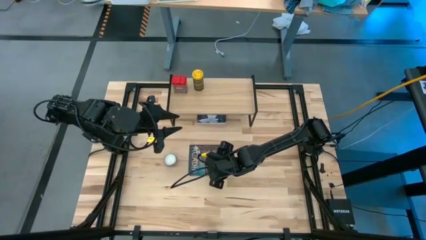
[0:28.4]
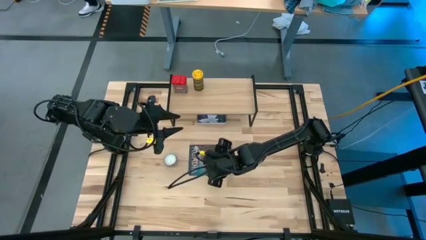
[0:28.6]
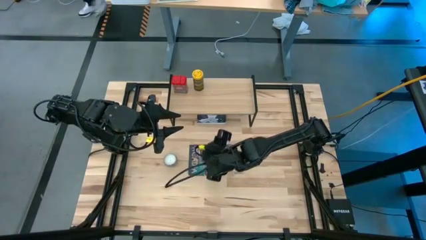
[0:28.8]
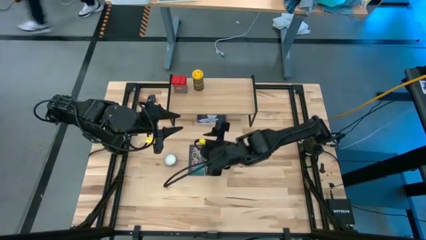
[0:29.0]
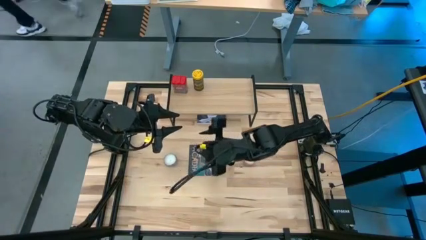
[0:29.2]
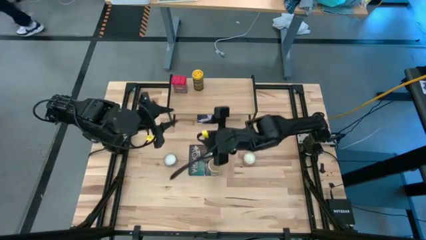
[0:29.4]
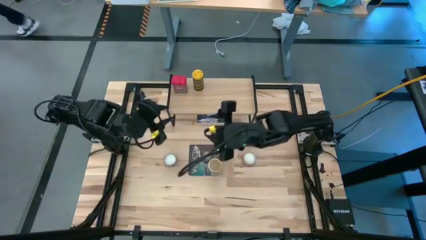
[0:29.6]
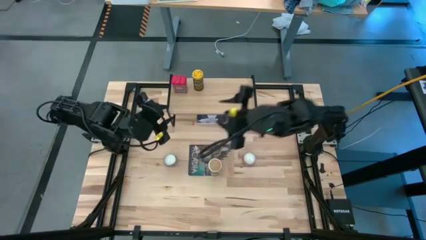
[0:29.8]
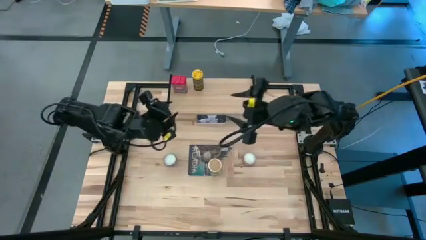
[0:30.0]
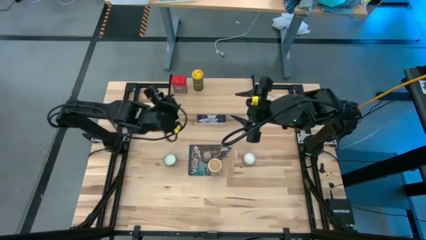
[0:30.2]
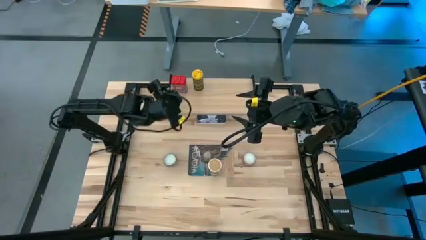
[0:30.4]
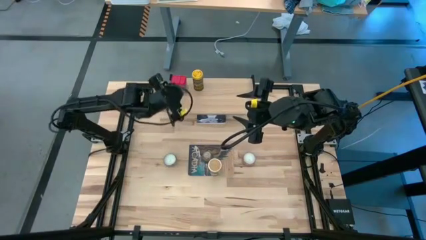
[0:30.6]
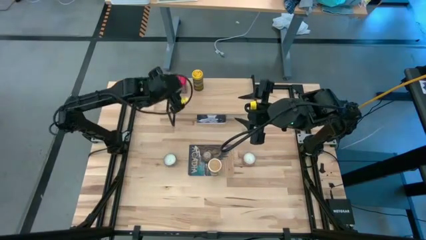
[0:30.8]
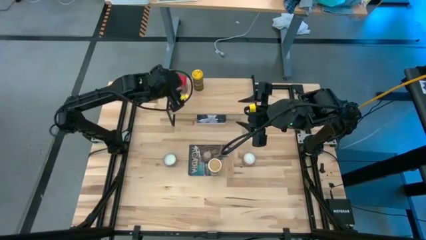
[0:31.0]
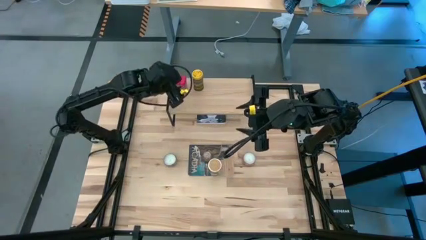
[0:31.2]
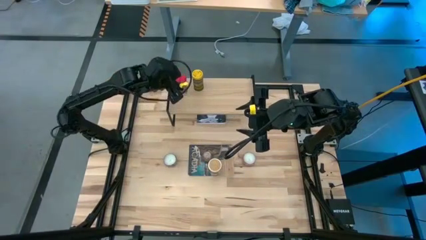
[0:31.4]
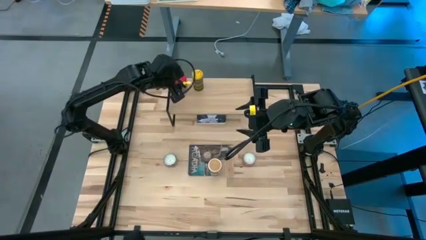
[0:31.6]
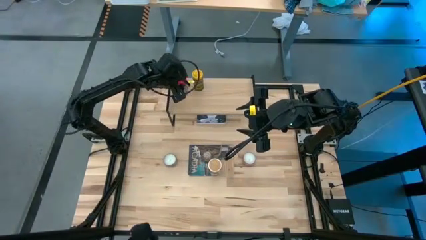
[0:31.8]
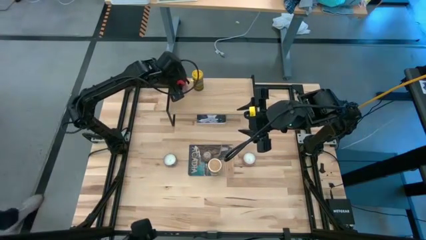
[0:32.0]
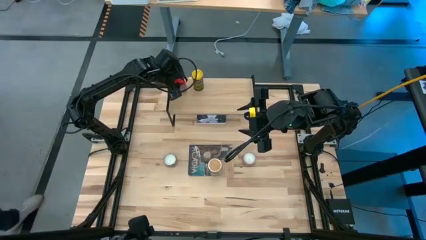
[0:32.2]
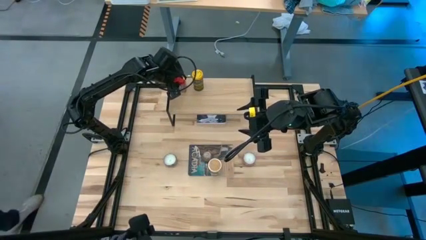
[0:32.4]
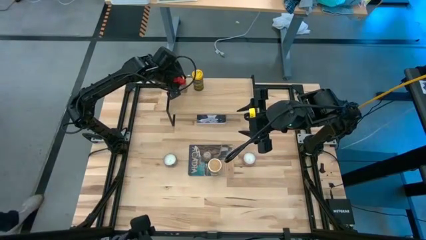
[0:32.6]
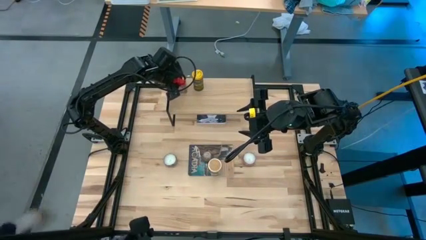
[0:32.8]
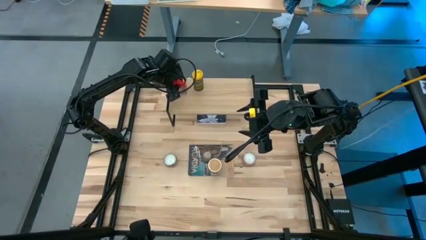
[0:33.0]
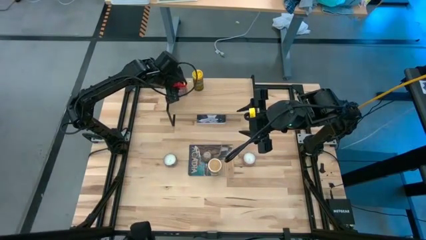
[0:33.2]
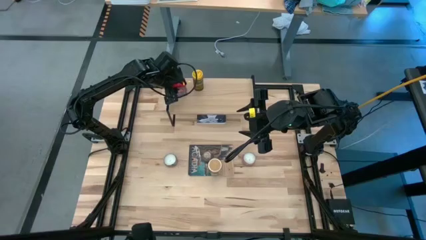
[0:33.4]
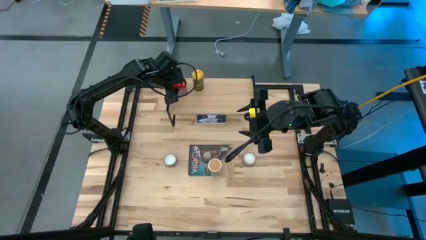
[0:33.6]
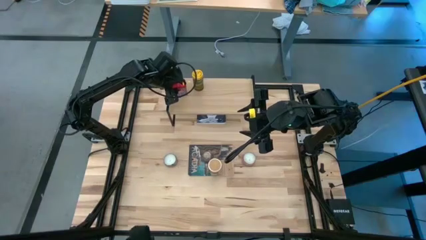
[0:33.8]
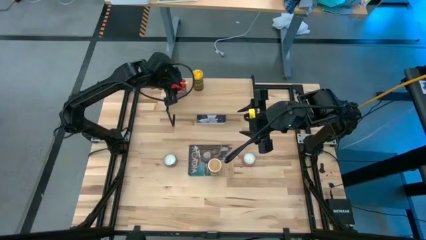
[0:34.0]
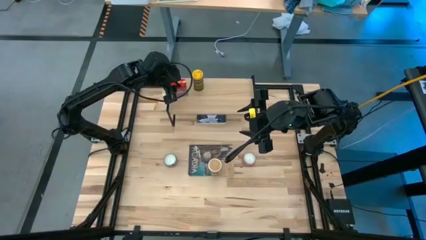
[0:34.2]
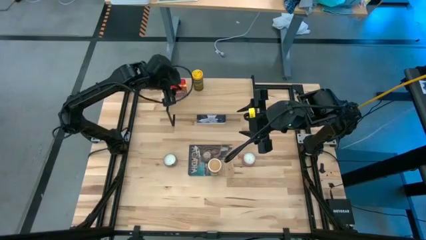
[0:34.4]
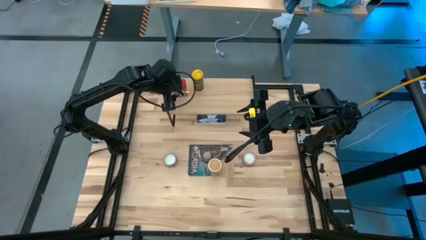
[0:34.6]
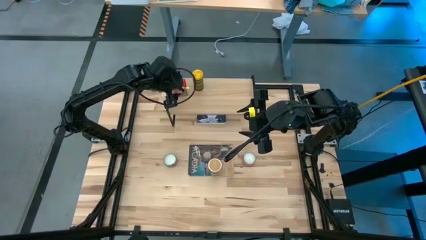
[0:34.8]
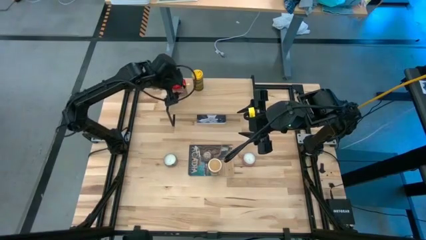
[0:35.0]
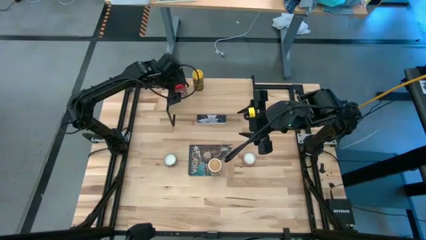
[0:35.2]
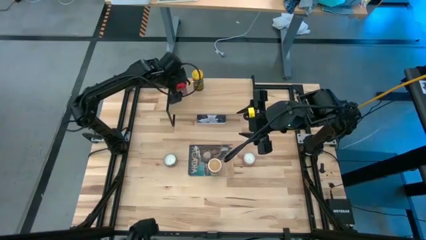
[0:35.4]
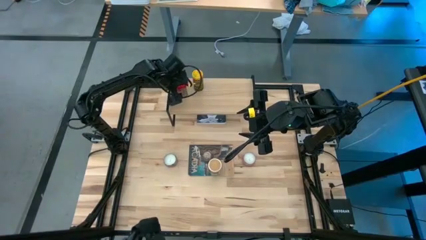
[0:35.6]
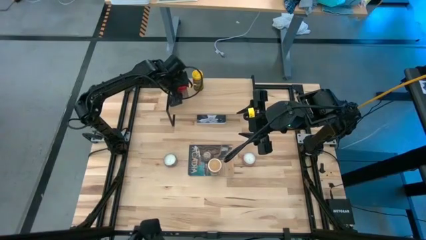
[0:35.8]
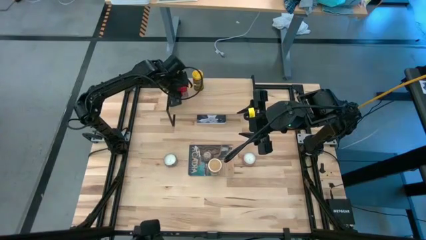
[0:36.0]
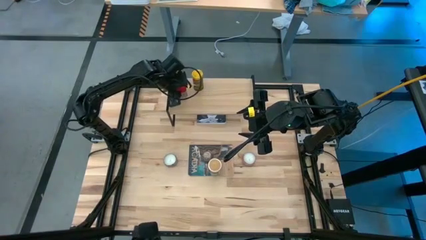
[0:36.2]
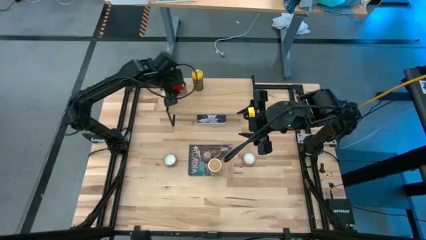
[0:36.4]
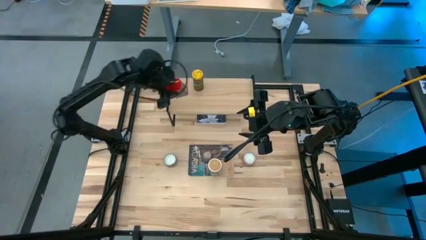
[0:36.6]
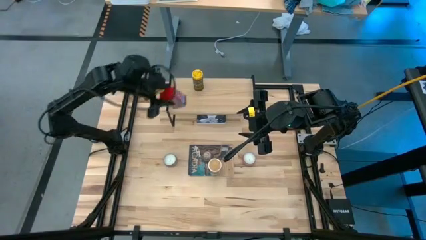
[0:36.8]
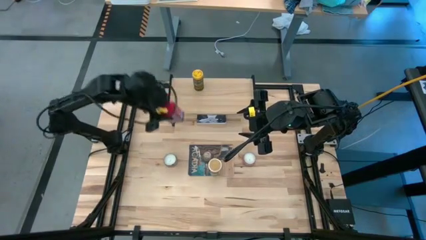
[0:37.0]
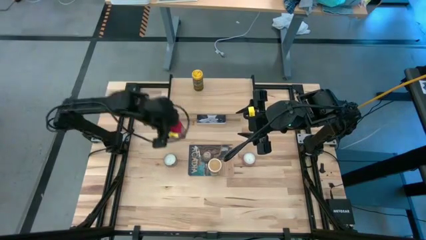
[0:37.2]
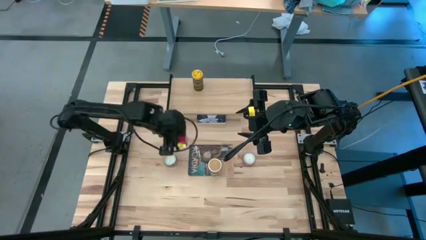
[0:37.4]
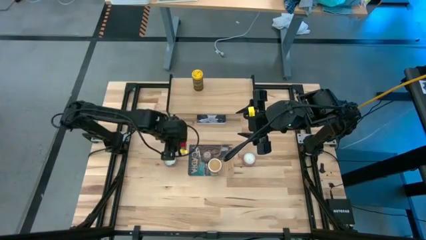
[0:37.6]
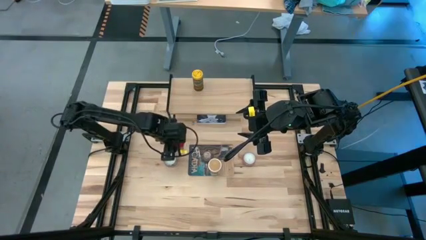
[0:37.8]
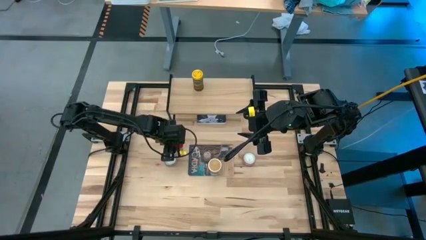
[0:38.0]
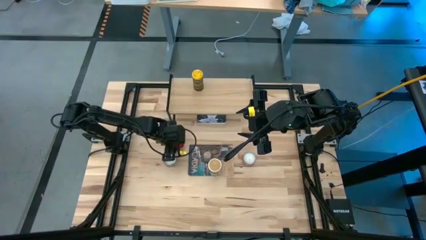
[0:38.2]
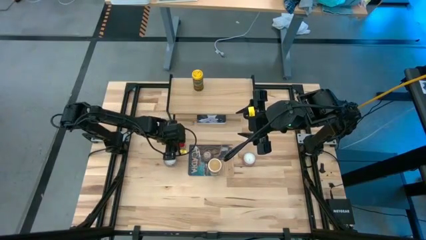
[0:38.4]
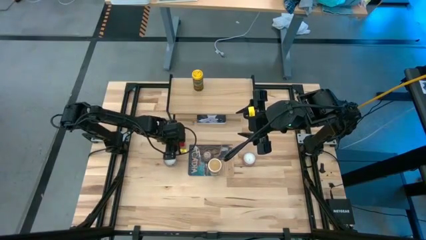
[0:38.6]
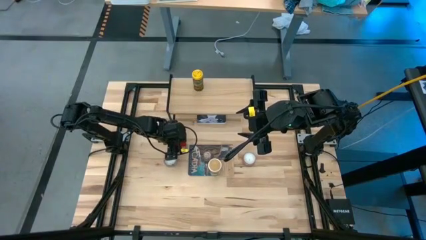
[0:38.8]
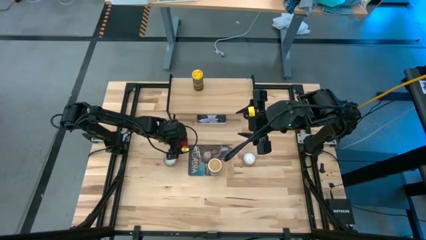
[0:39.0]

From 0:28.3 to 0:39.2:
Task: Shelf spices
Remove the red seasoning can from the shelf

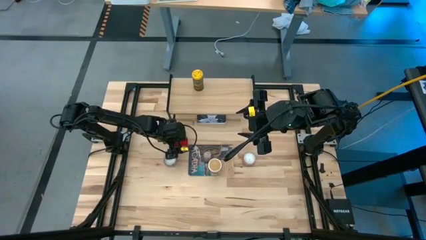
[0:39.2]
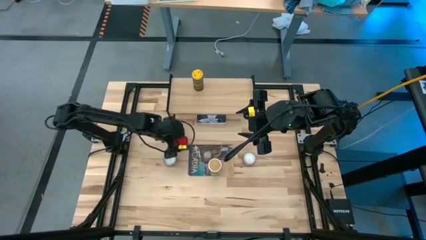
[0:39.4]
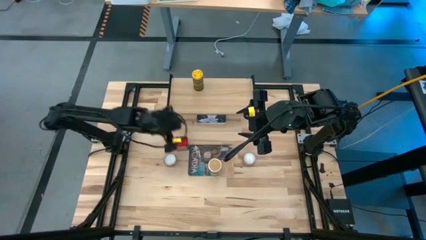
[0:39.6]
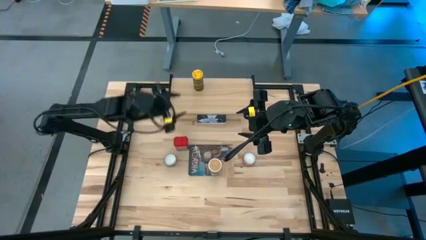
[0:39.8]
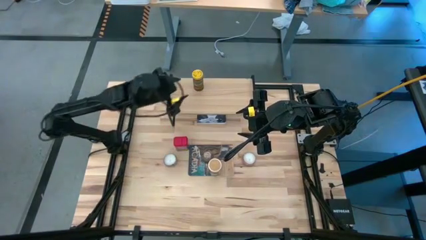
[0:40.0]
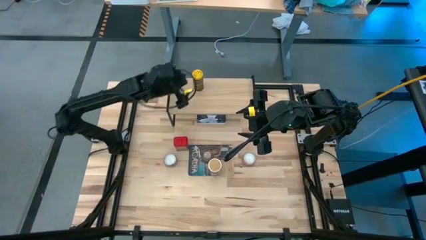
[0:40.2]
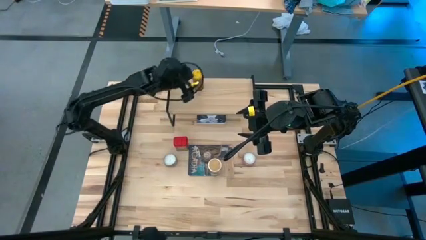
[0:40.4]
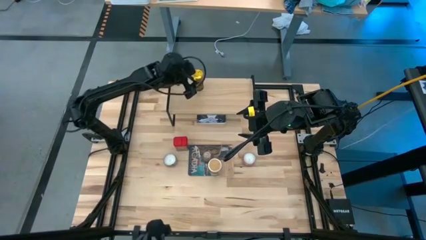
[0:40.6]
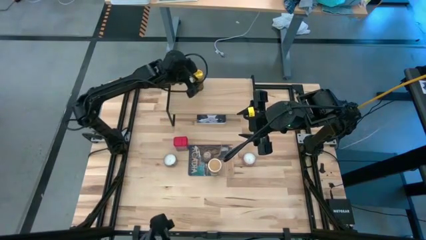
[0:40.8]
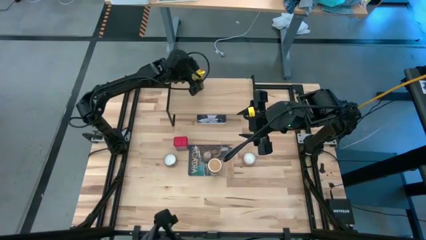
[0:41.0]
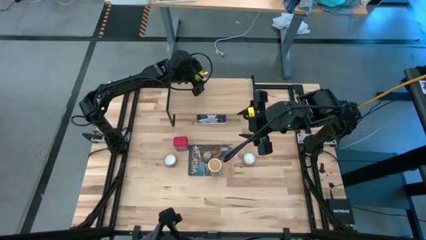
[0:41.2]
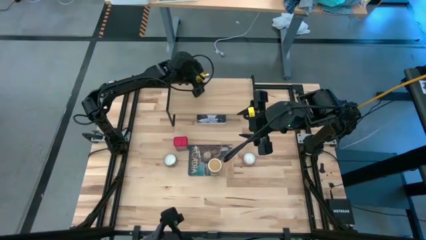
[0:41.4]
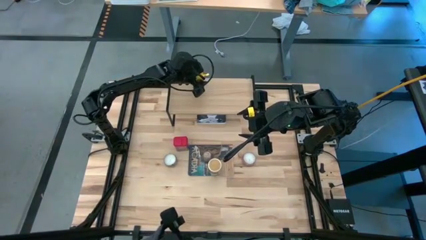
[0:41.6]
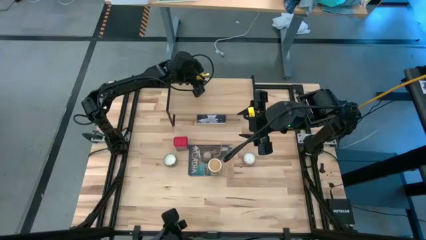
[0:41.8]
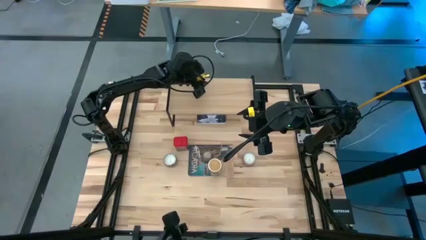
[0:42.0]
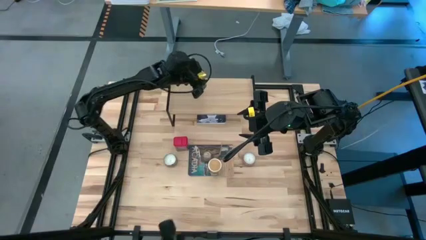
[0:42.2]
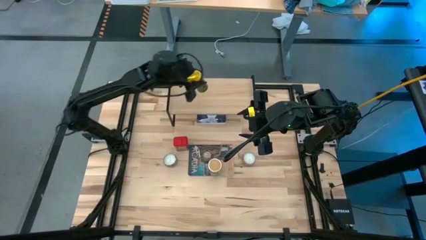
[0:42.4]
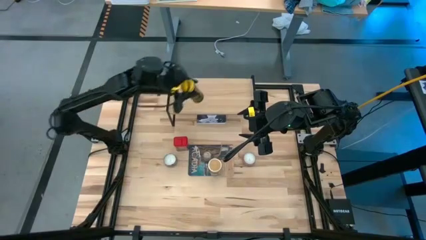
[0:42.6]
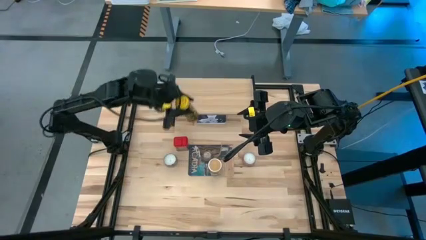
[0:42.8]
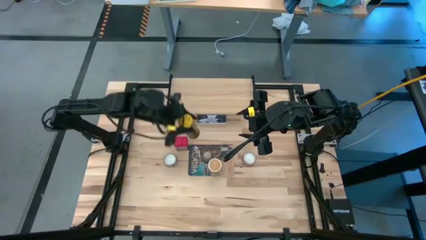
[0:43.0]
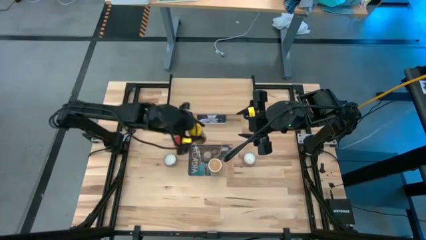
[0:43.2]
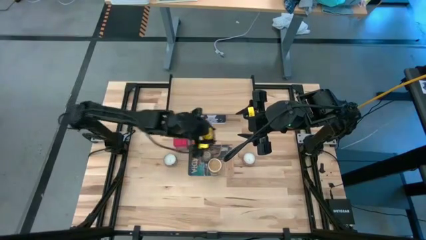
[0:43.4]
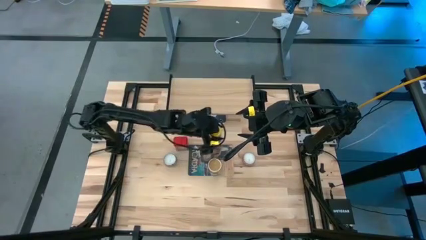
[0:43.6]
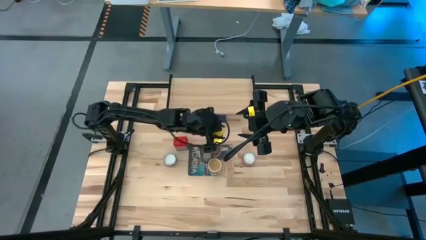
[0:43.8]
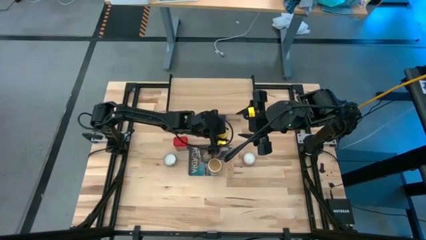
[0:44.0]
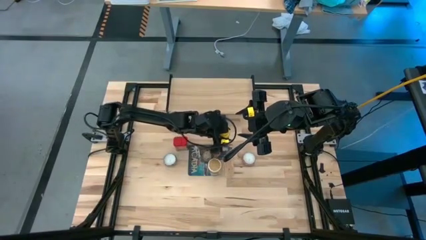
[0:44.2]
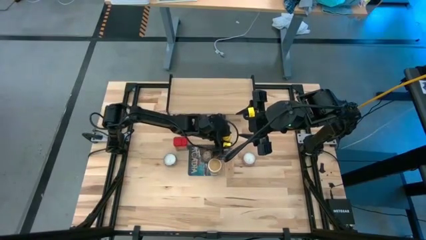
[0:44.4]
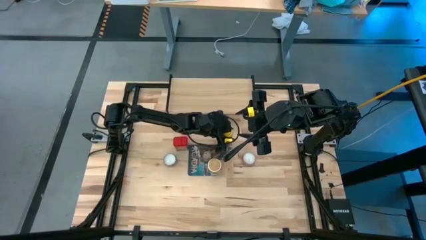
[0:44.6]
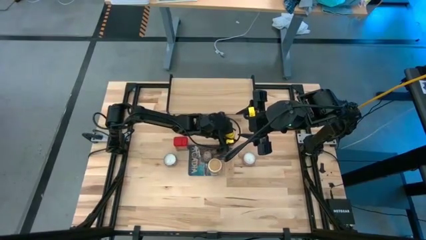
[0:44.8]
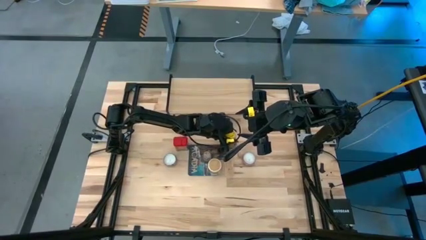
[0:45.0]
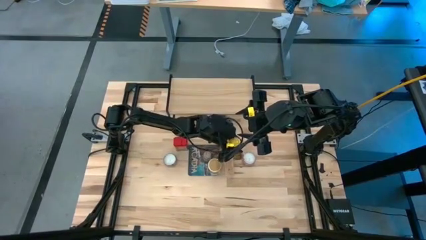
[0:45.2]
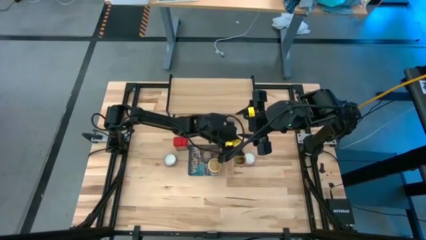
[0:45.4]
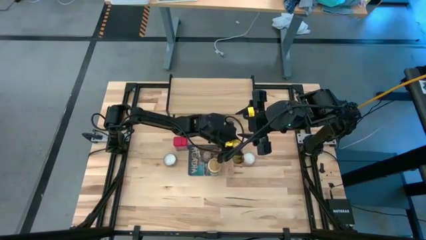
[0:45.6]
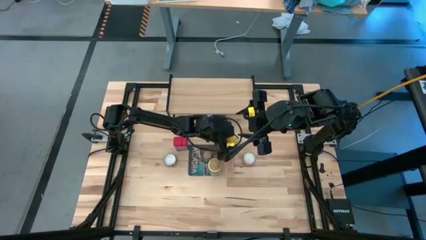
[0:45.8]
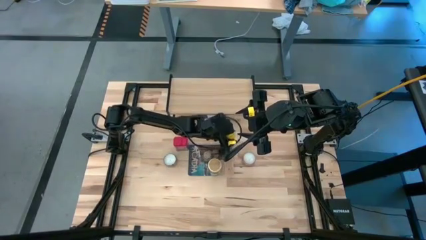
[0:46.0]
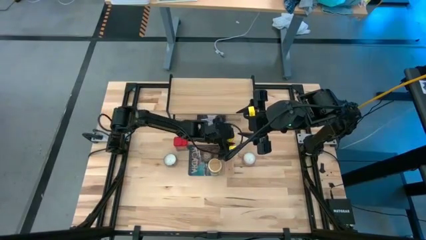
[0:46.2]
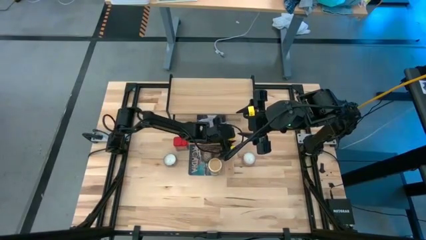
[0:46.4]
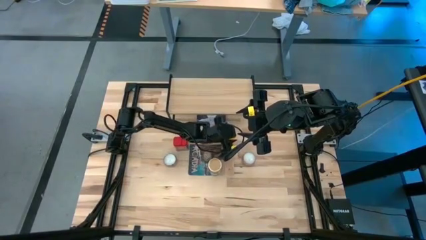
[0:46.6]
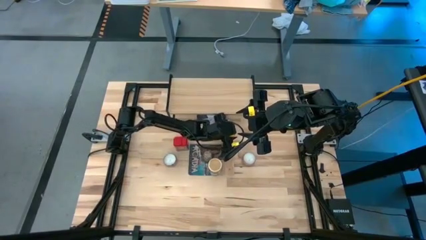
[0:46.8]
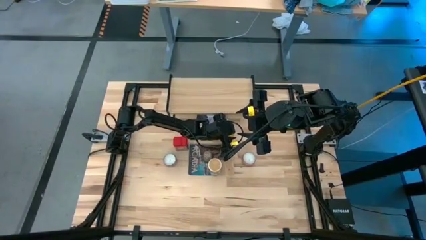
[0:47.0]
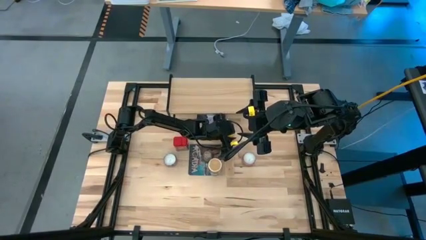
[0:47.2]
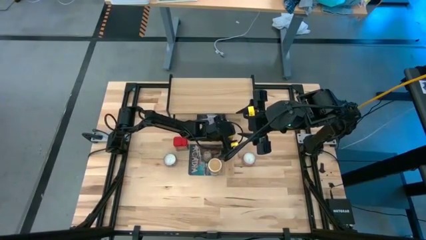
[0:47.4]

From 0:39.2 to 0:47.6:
Remove the yellow black seasoning bottle from the shelf
